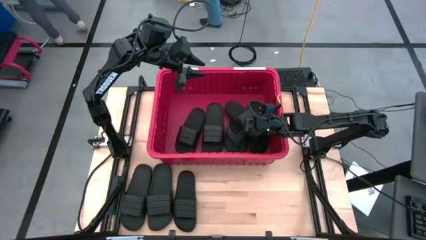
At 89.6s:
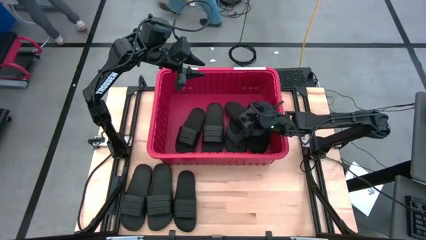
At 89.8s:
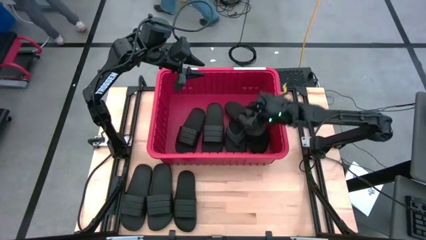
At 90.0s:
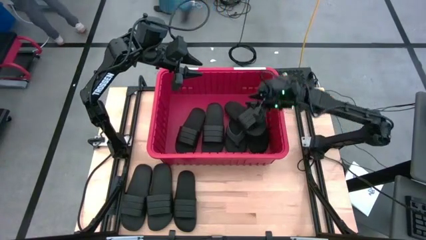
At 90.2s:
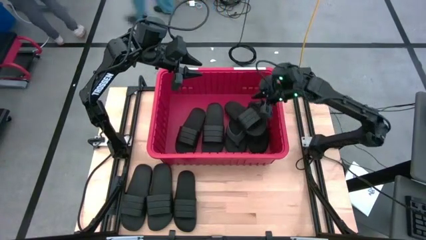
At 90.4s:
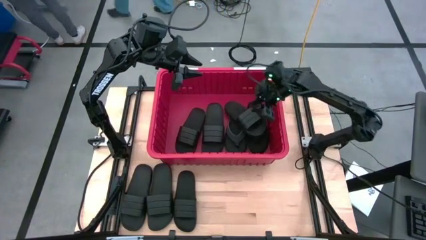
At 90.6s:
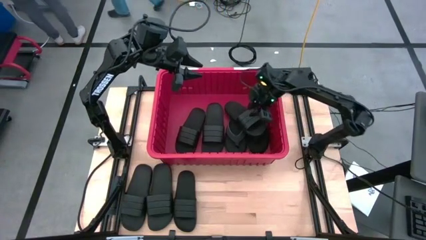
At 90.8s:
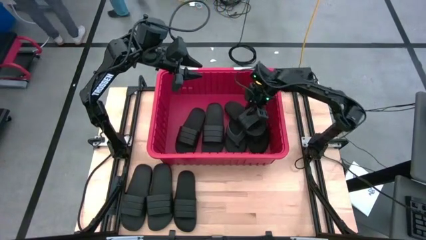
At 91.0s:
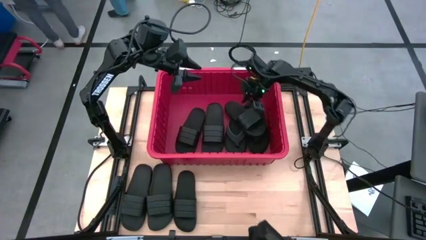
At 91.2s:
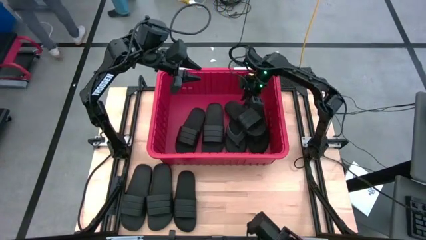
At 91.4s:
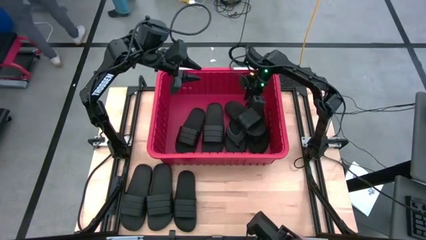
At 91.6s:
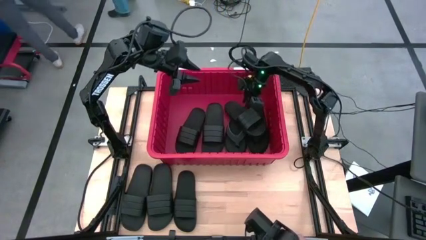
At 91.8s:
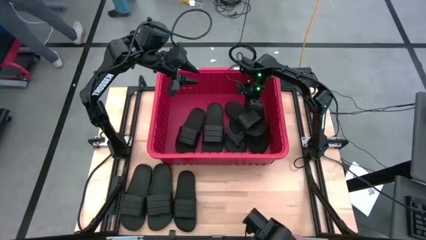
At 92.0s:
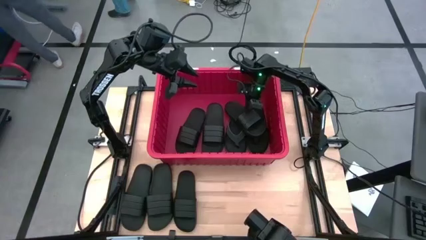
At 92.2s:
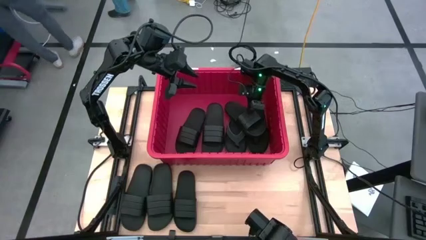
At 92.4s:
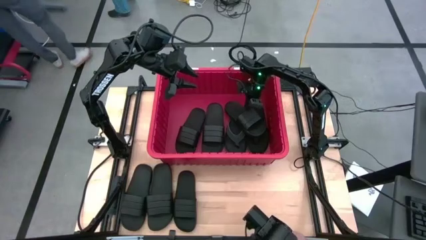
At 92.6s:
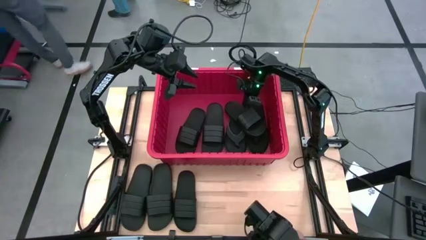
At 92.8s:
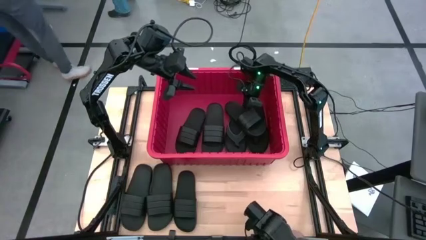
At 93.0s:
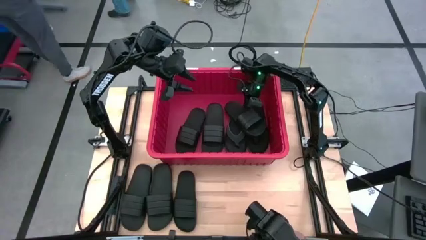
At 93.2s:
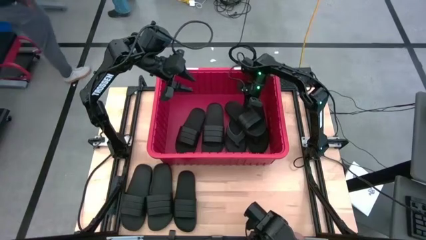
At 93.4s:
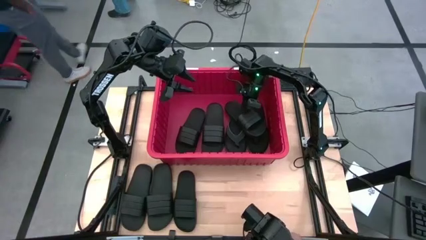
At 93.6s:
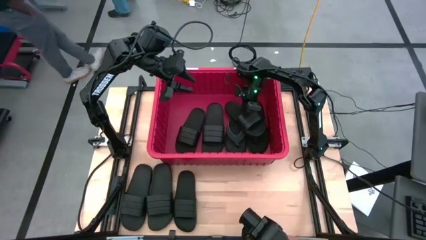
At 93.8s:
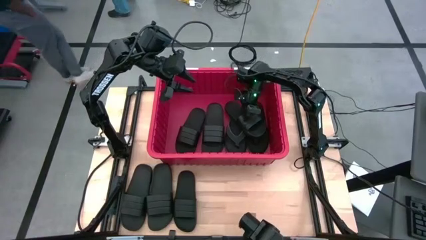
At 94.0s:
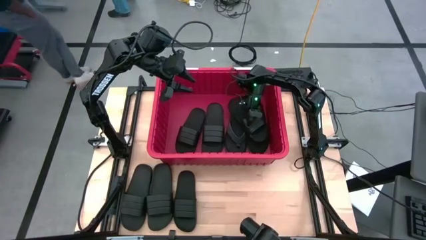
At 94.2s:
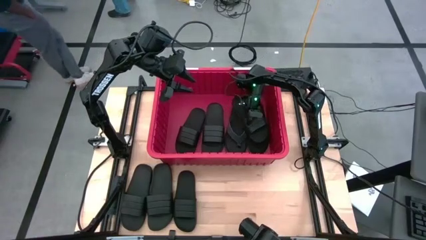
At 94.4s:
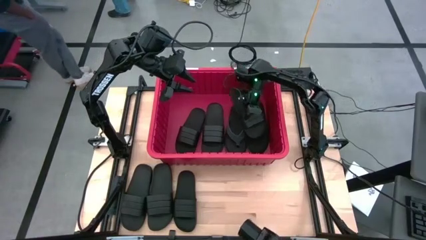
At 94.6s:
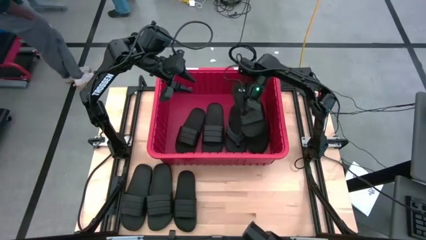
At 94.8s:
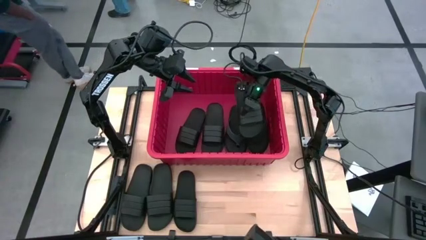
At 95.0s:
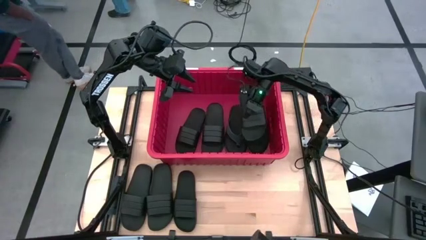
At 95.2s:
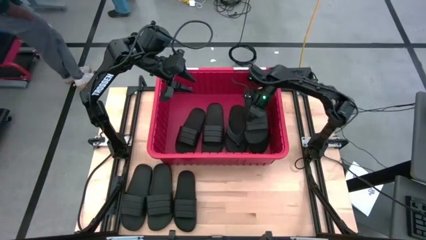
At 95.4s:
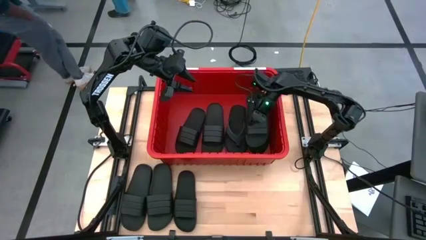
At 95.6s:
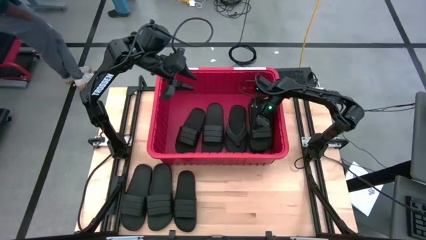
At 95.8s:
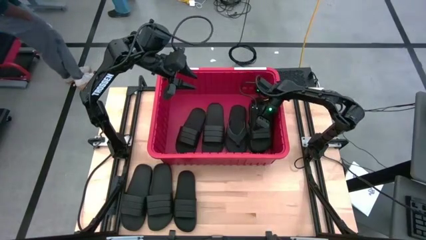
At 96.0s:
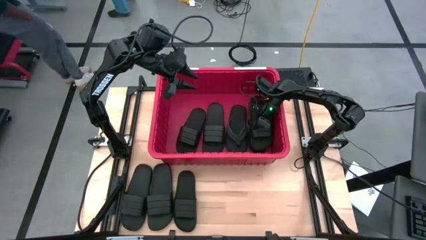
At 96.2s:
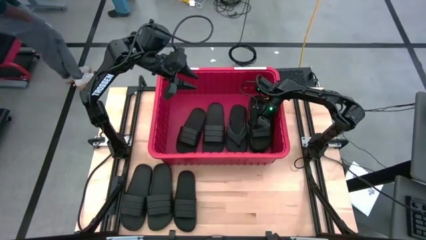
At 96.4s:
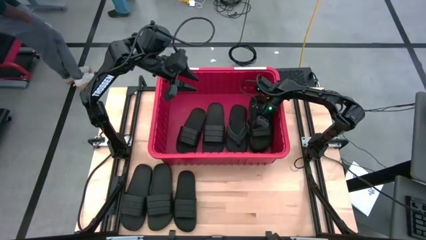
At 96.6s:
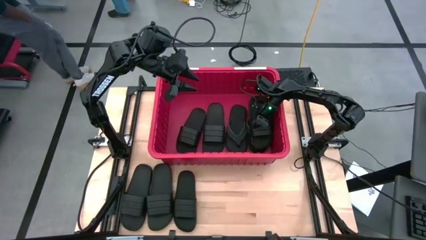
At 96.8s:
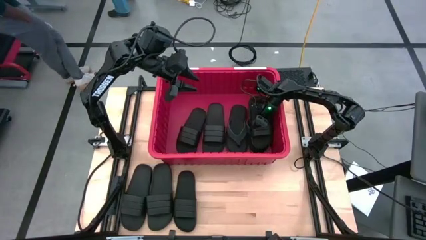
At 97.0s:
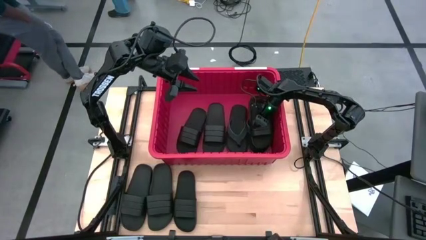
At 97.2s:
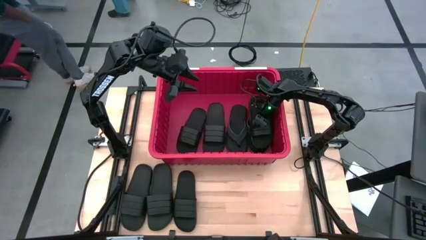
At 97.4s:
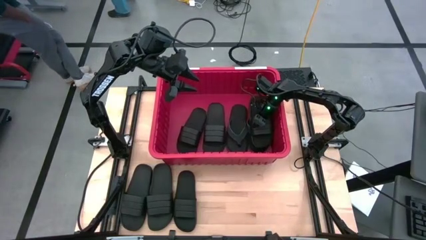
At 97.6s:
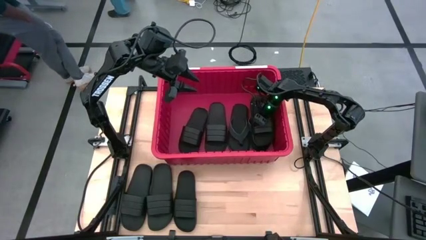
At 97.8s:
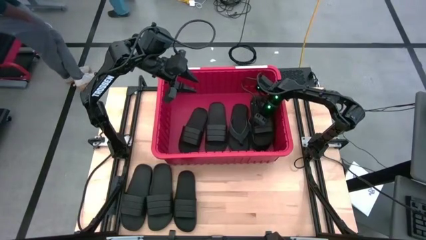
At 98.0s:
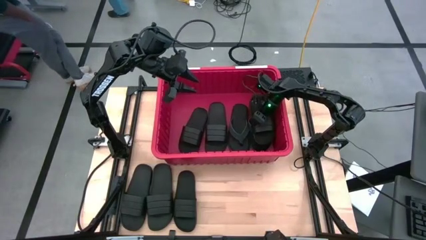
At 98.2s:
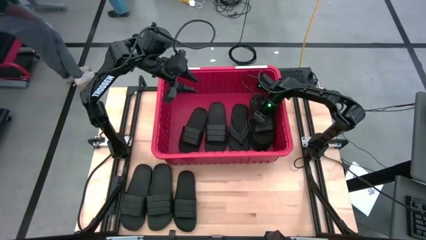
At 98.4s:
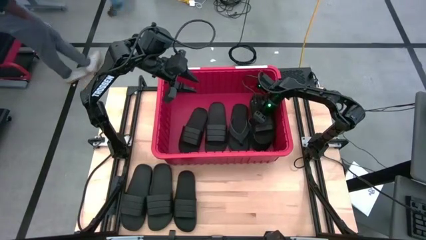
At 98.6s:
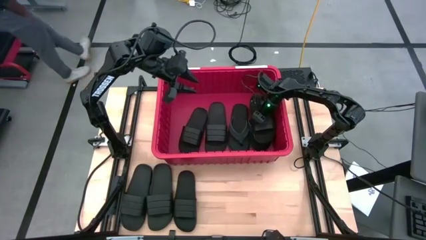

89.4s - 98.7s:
Task: Pick and place slides into bin
Adjust the slide in the red bin

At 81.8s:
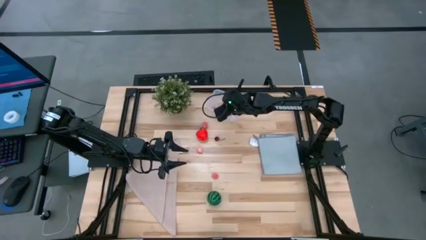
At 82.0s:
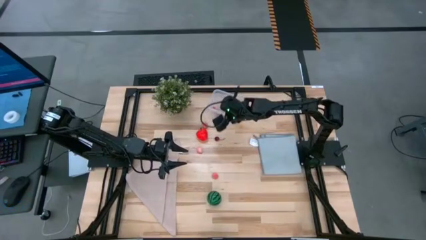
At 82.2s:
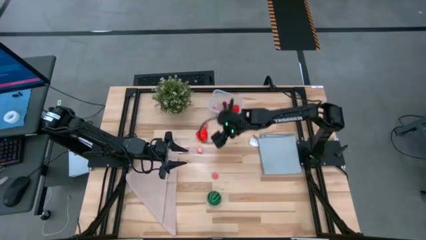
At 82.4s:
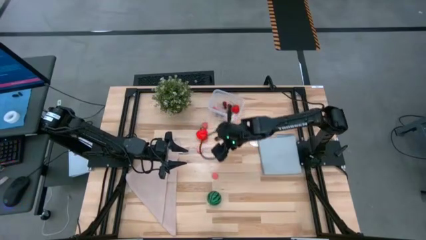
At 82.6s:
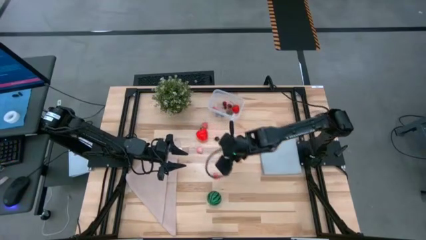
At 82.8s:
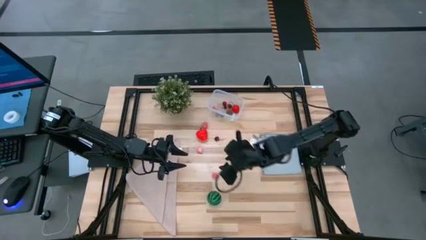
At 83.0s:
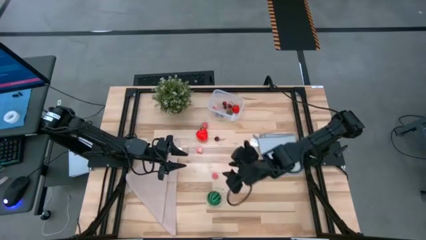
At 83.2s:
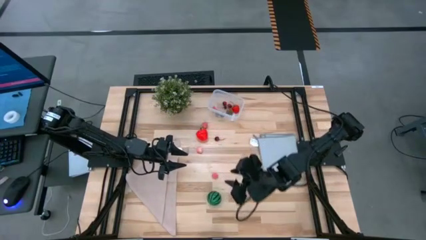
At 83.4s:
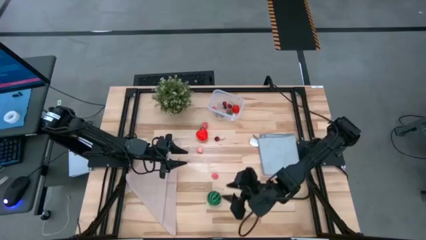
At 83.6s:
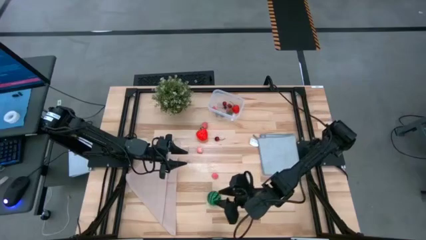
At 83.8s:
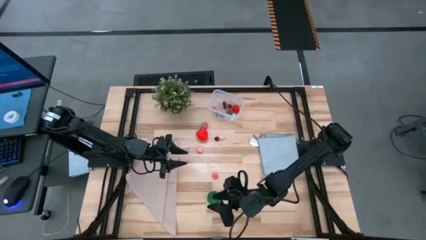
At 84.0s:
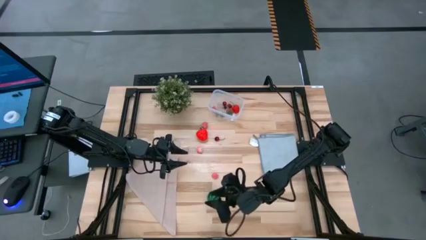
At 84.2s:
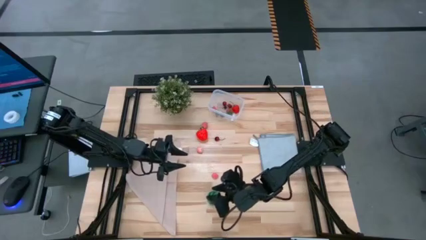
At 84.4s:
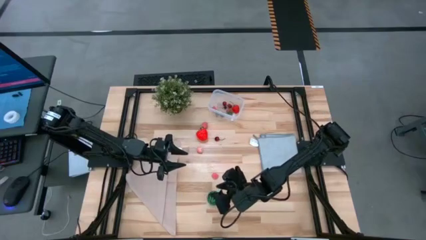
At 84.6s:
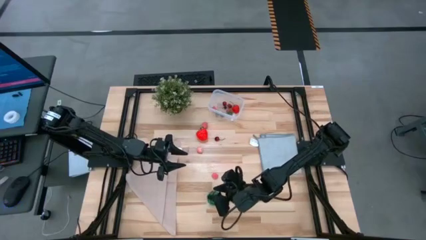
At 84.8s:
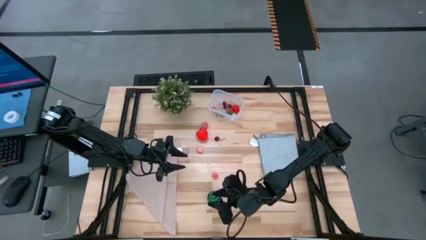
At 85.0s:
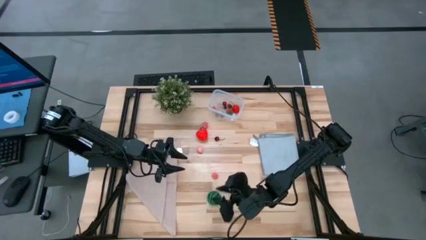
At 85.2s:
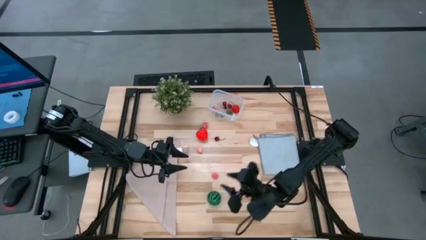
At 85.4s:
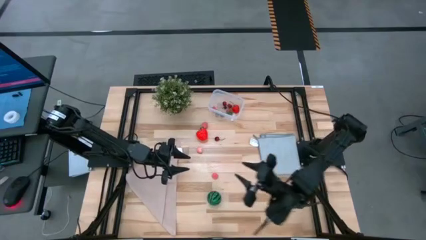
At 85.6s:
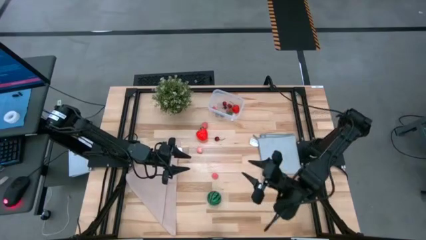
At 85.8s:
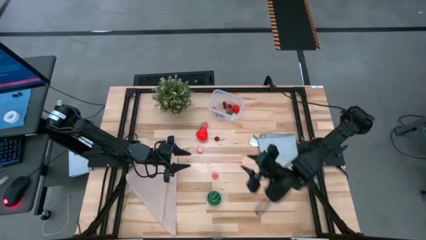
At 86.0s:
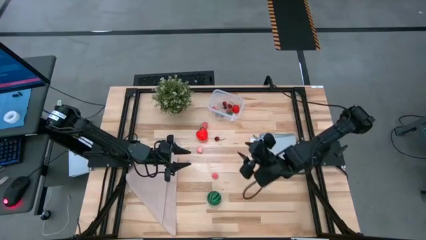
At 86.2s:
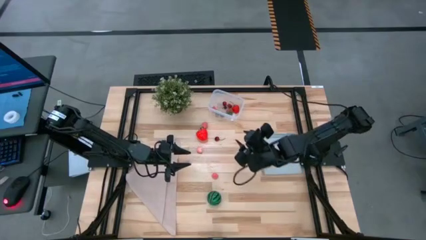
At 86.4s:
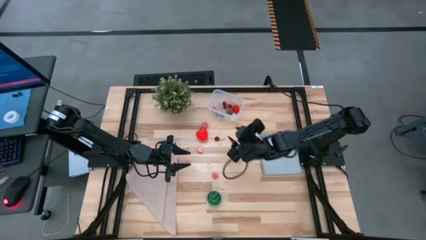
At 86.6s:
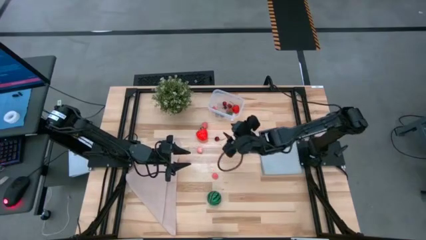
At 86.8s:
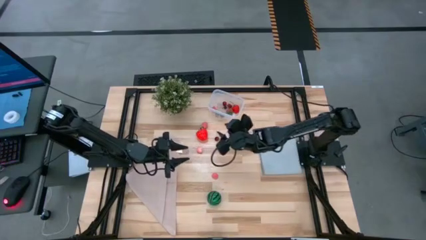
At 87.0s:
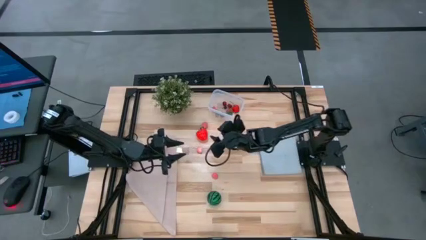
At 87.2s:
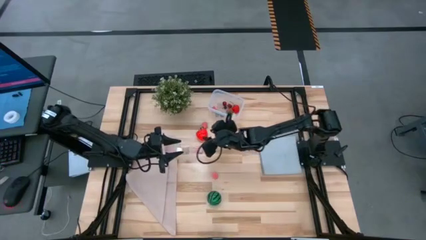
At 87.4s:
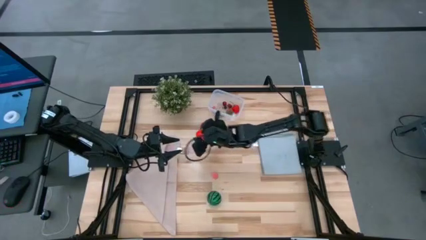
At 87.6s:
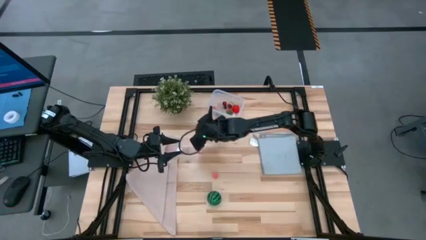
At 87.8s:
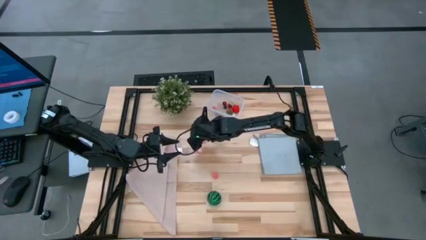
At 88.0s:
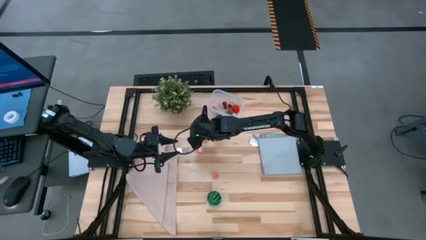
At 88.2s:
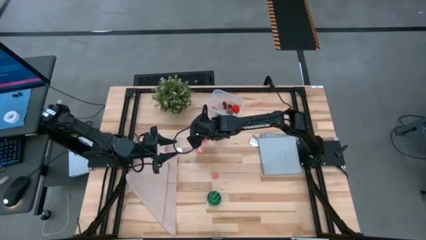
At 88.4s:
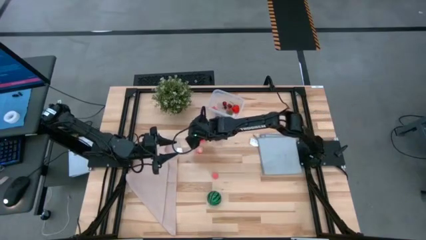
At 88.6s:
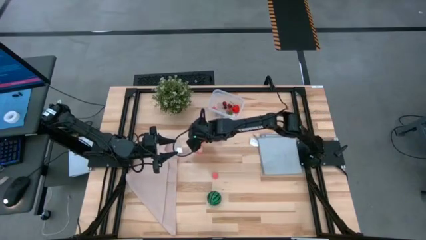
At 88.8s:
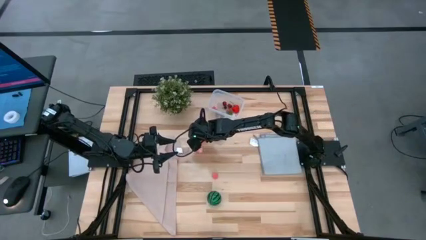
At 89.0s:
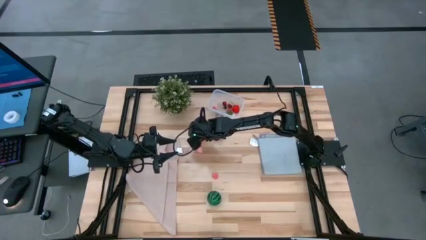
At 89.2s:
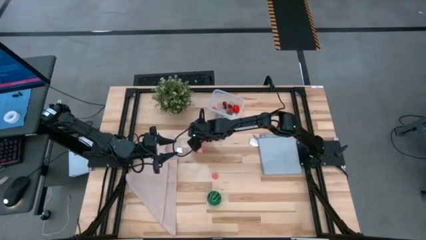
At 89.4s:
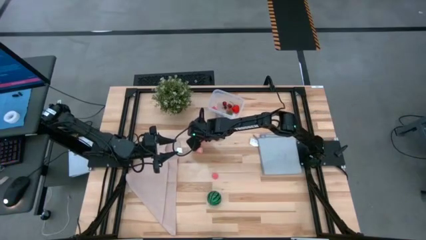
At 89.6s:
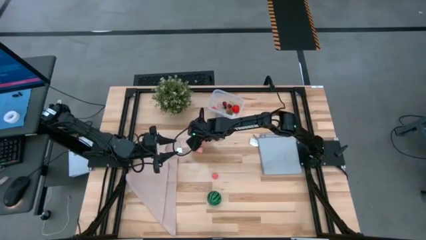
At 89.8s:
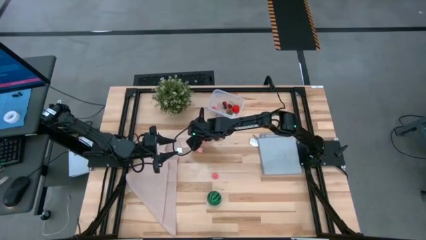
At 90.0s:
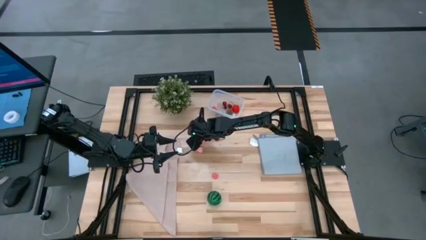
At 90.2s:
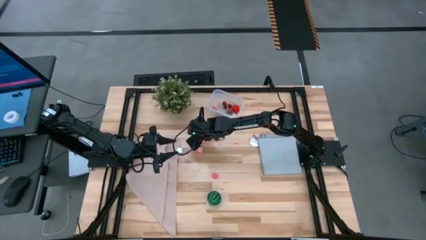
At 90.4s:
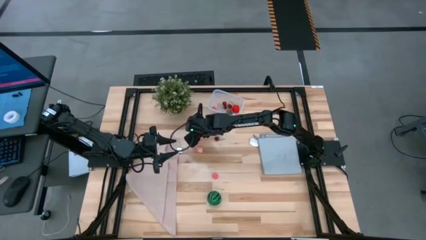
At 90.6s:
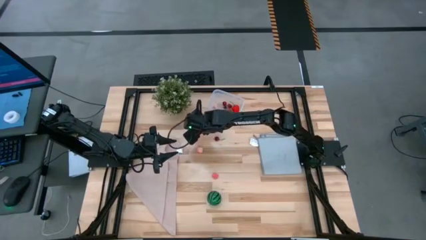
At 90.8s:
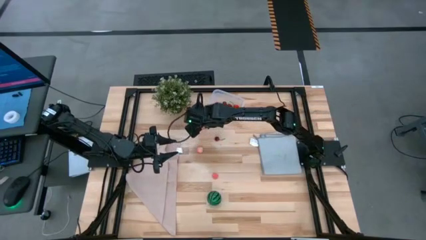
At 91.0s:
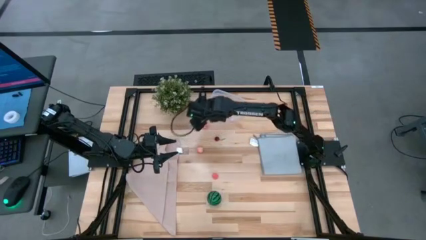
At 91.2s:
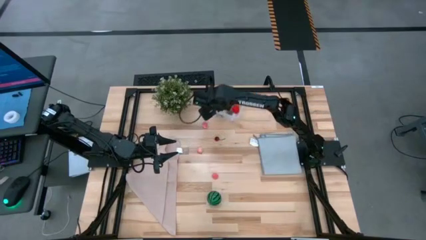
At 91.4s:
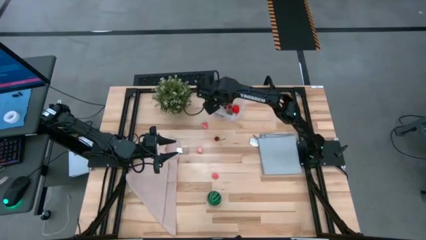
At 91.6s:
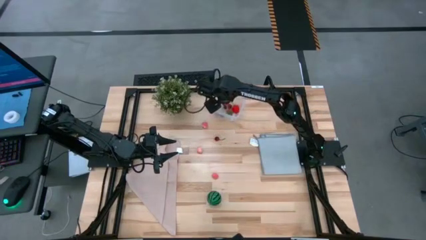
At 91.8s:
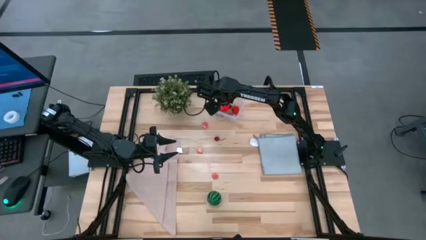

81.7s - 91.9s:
Task: Pick and placing Produce into tupperware
Put the apple into the transparent bin
